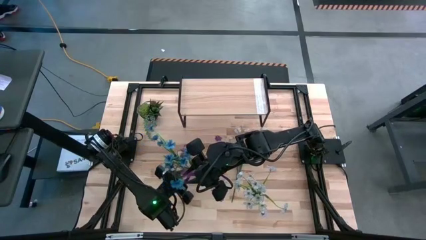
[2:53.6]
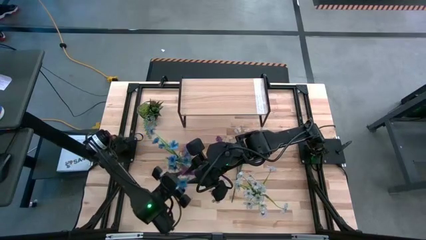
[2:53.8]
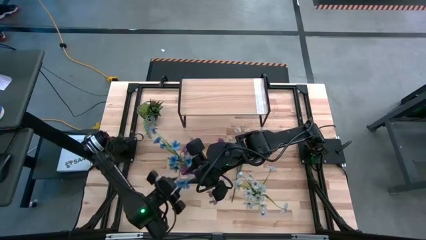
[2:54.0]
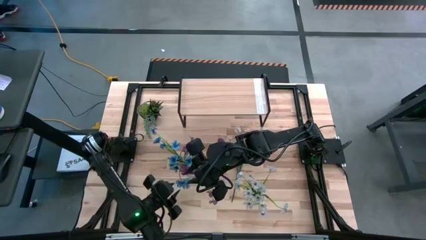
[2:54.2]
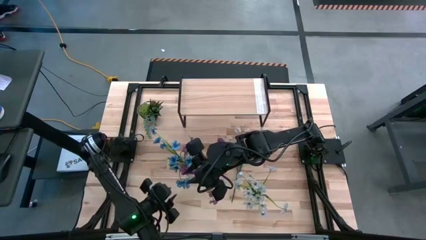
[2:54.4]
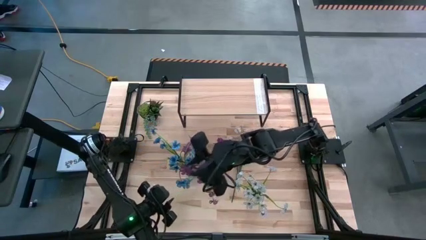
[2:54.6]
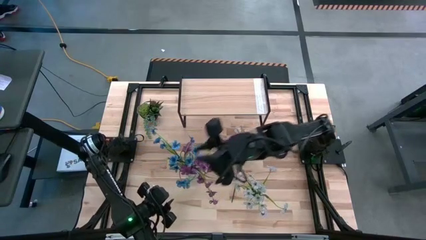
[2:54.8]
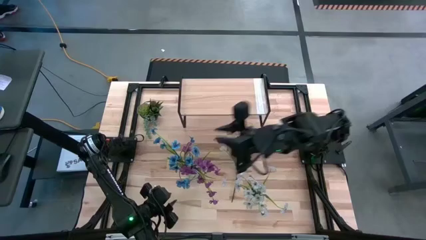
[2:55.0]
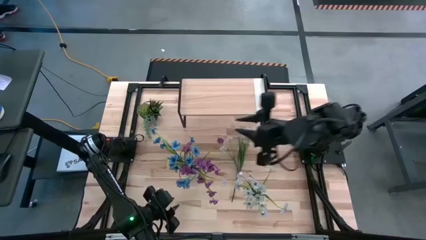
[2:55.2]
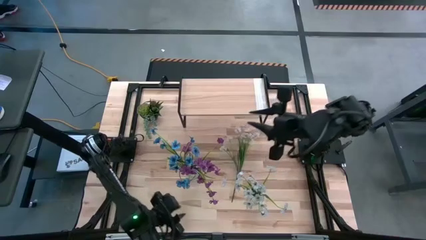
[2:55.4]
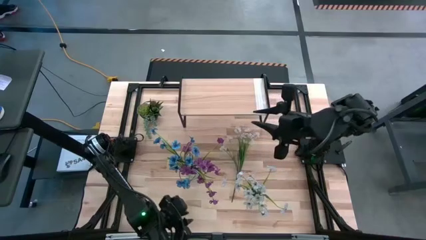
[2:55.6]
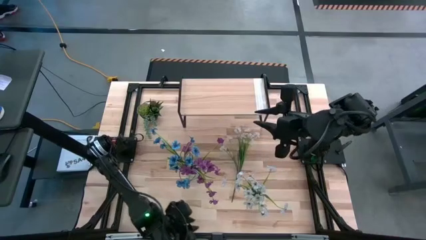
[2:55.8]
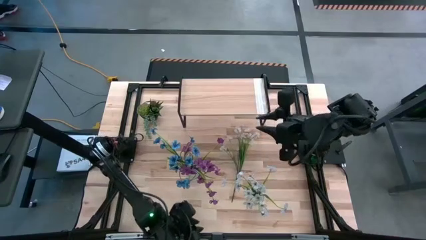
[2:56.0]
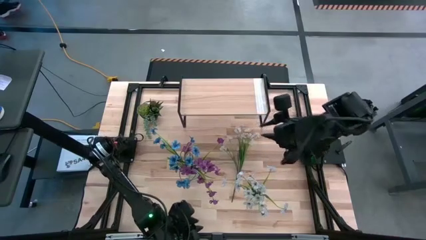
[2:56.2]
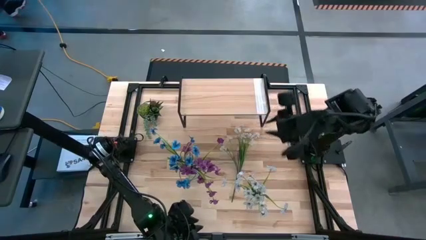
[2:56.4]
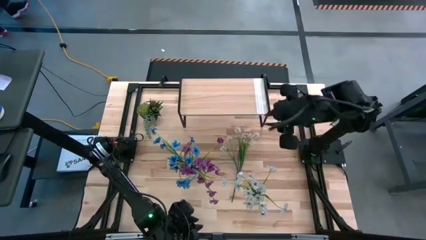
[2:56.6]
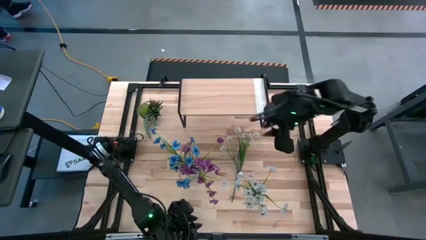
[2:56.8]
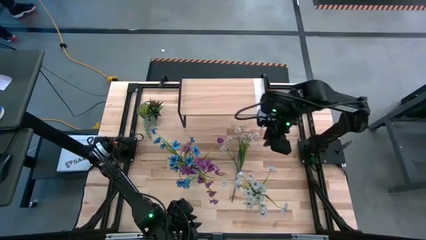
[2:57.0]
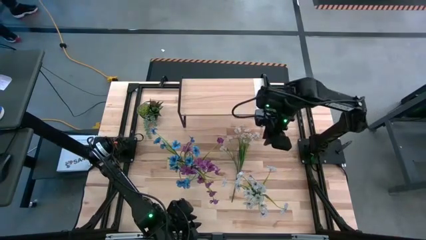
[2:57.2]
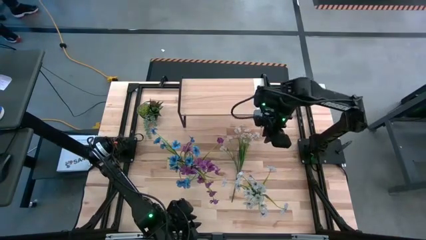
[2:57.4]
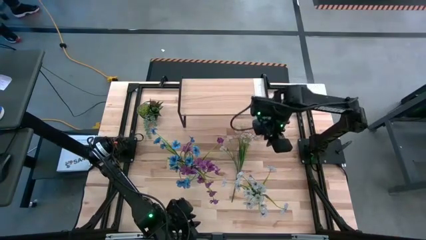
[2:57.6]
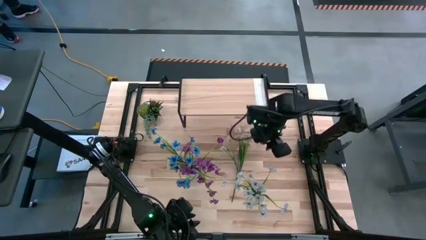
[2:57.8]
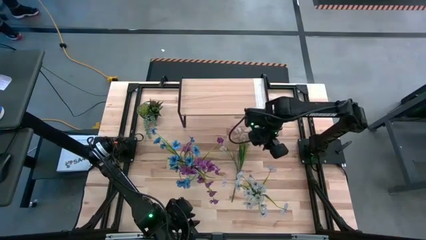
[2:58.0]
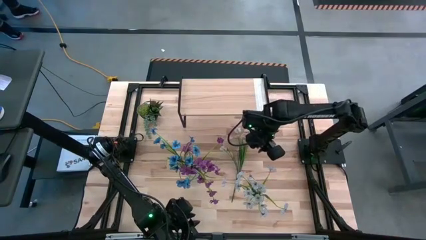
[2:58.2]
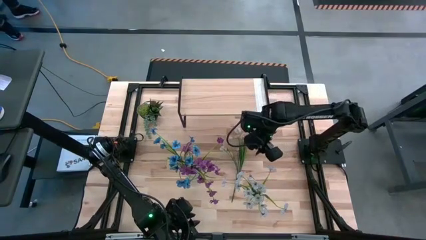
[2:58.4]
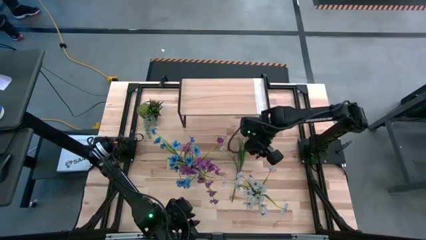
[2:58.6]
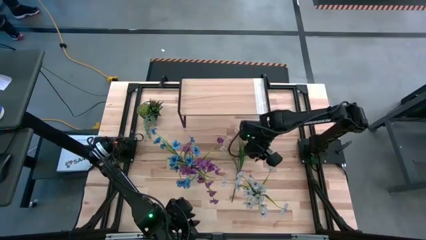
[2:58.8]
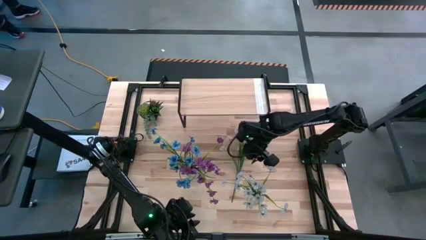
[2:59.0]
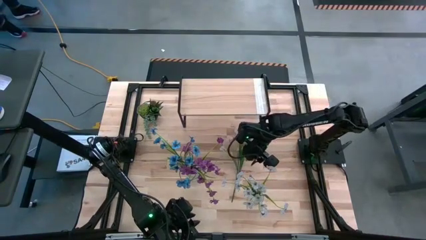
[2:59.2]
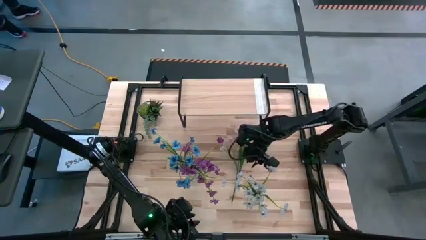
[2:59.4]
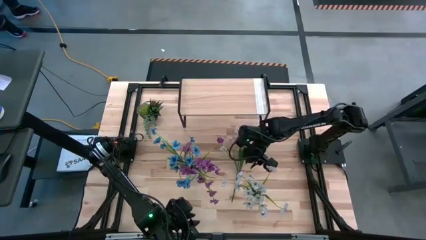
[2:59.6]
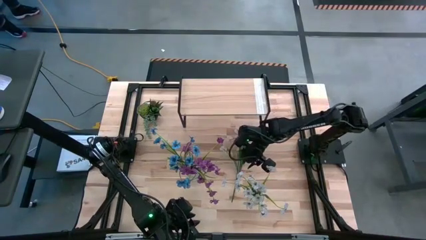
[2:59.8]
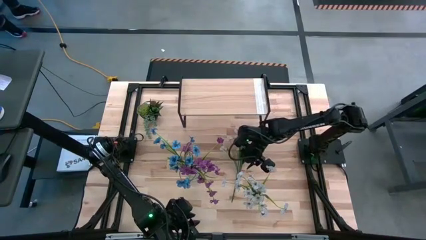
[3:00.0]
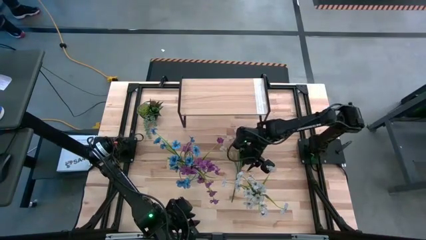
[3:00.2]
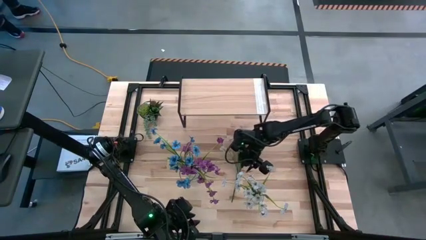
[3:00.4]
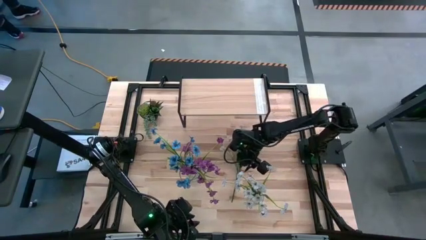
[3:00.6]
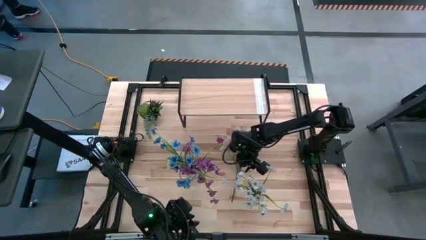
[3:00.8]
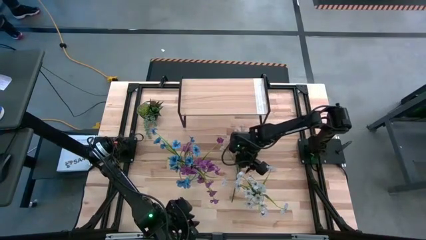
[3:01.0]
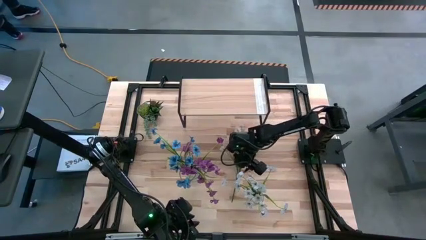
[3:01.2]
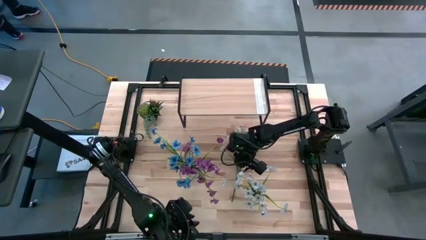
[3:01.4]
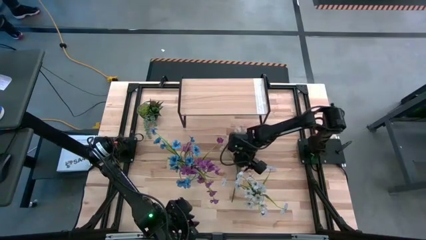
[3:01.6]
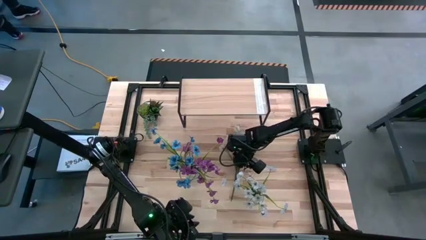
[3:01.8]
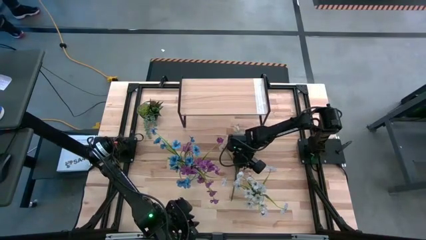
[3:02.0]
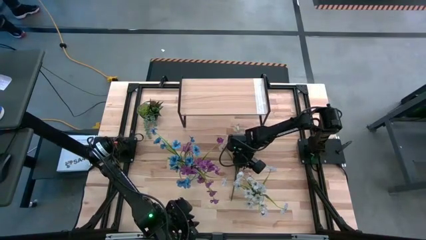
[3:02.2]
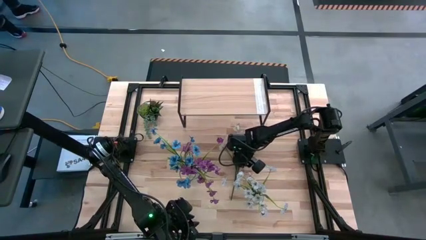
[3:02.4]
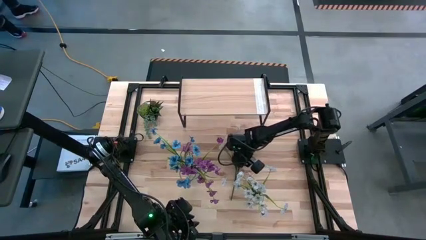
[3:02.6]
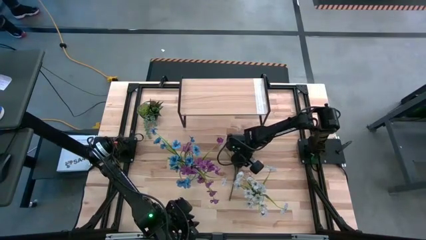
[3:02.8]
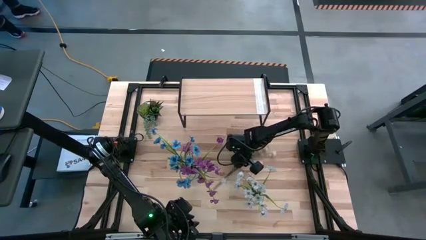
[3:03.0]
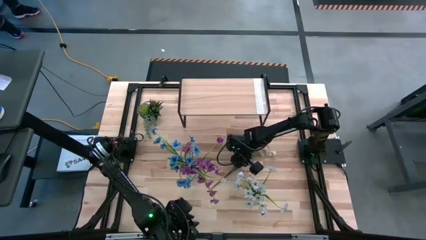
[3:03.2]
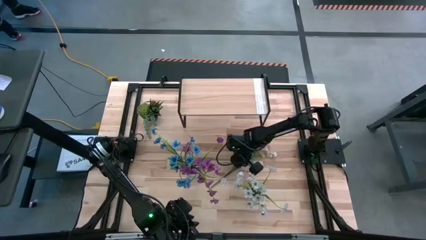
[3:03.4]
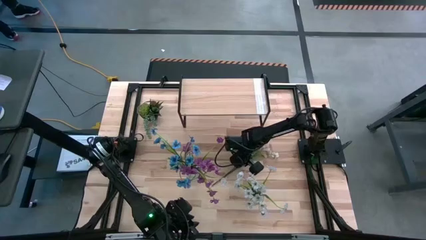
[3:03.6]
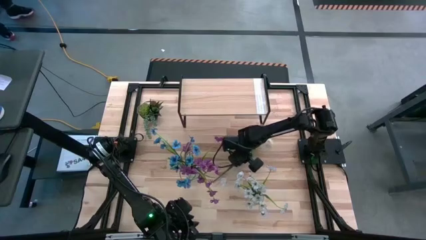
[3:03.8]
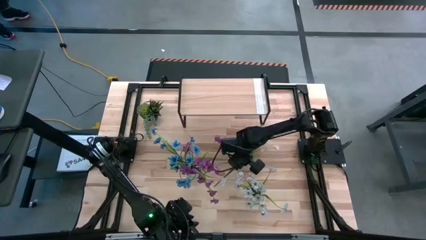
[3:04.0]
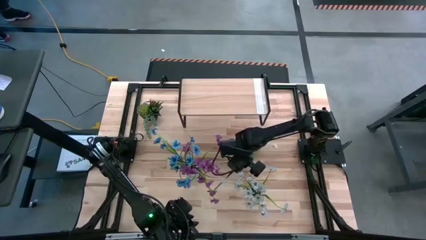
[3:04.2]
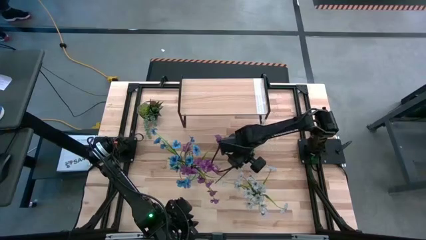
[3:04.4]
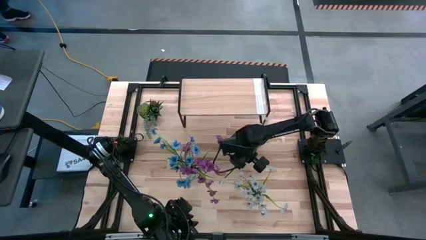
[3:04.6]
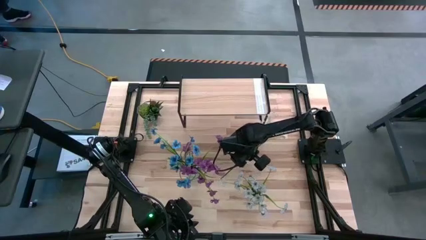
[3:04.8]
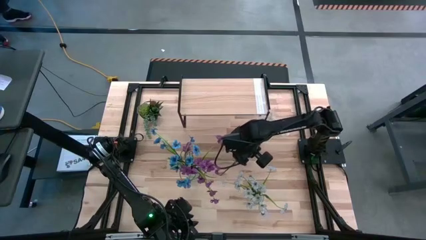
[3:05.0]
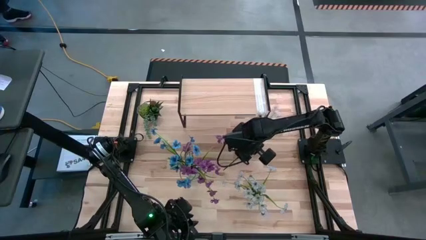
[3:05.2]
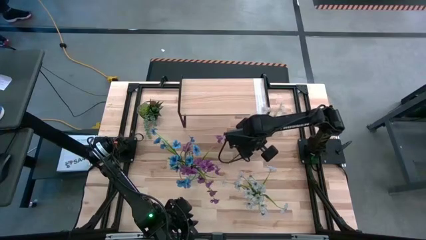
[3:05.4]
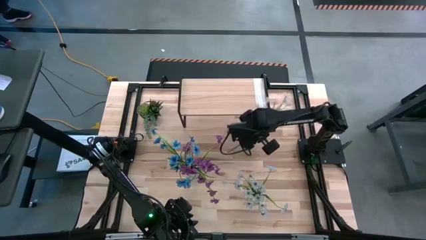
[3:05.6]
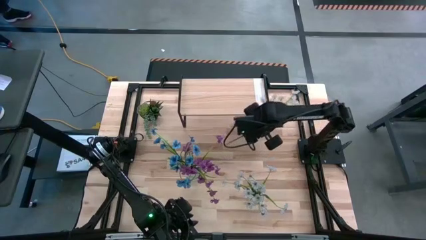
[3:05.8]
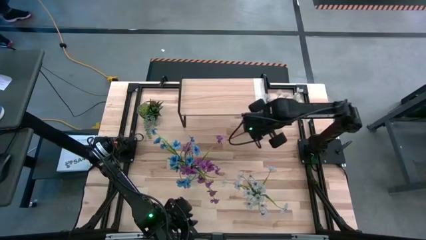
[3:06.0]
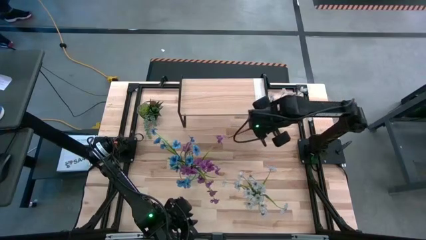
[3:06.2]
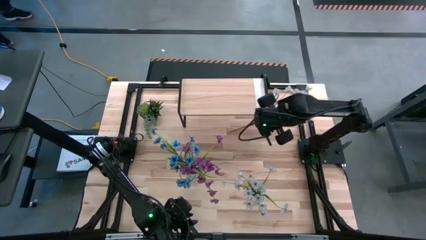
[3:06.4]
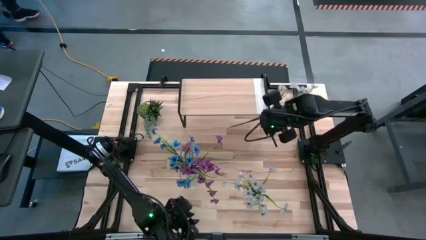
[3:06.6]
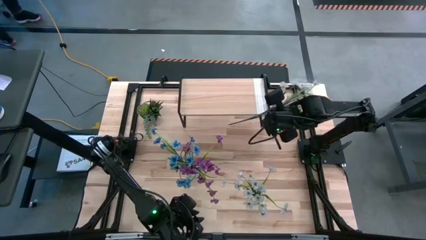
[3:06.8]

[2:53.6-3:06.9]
Task: Pick and place flowers into a vace then onto a shelf
Put the white flowers into the right transparent vase

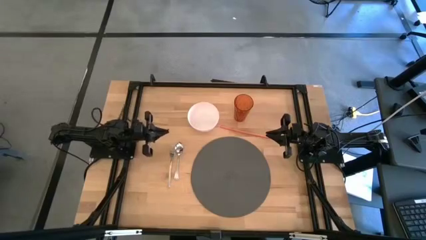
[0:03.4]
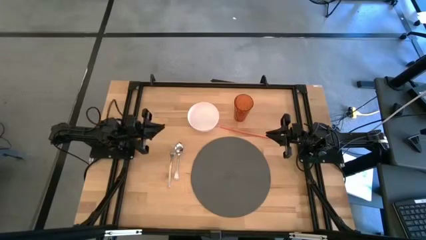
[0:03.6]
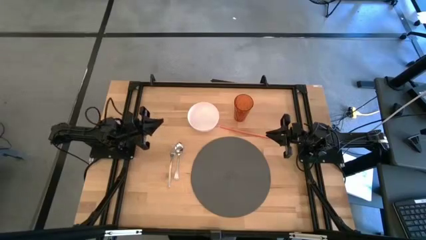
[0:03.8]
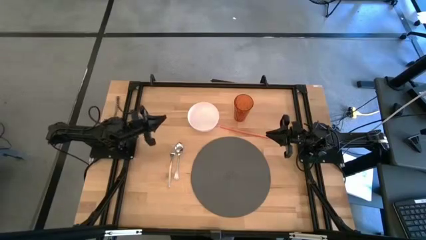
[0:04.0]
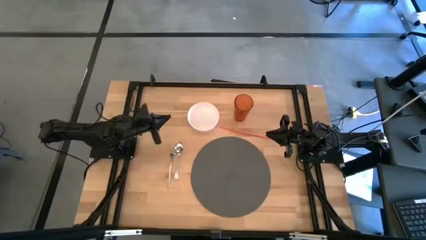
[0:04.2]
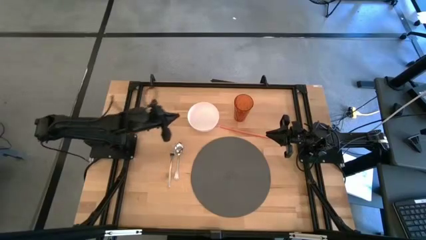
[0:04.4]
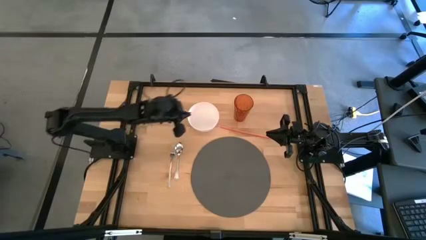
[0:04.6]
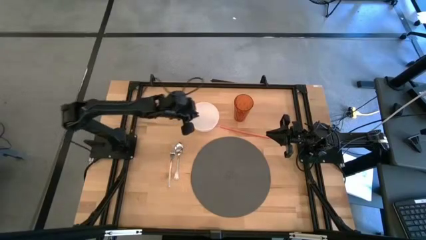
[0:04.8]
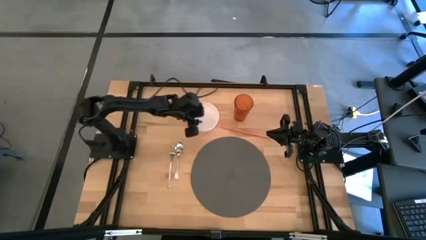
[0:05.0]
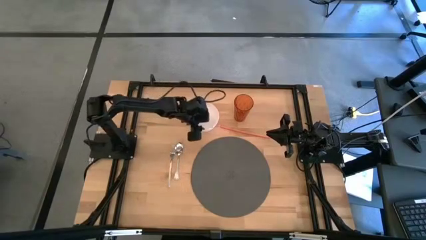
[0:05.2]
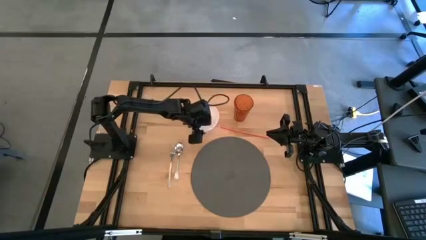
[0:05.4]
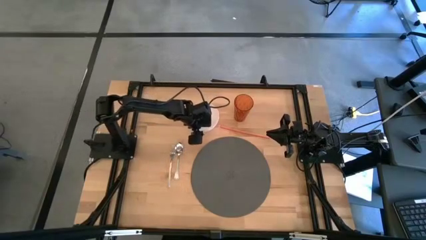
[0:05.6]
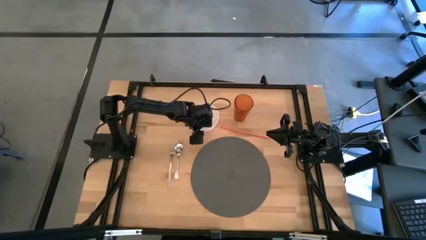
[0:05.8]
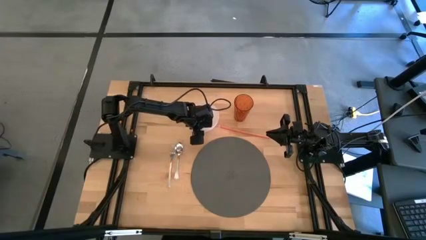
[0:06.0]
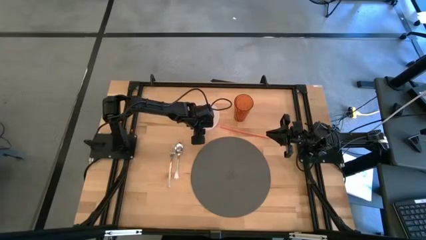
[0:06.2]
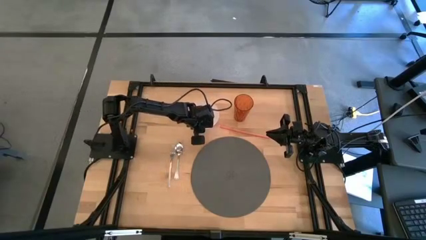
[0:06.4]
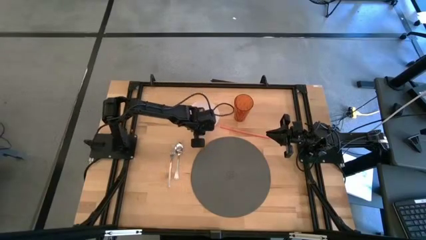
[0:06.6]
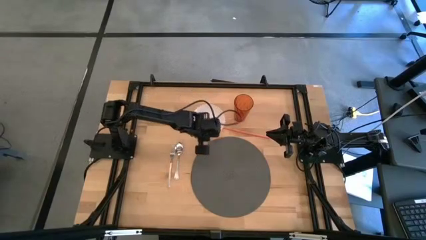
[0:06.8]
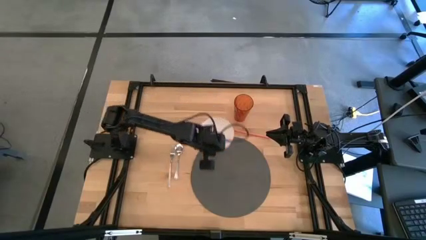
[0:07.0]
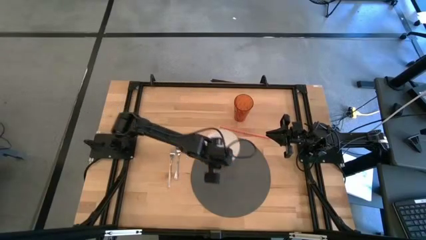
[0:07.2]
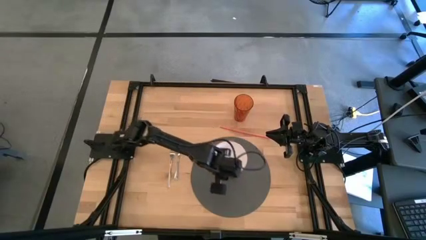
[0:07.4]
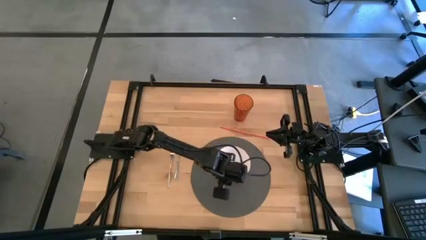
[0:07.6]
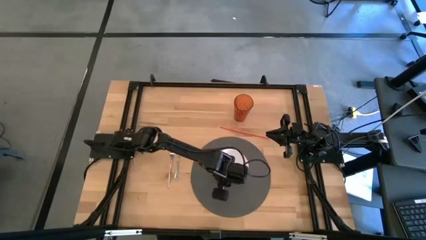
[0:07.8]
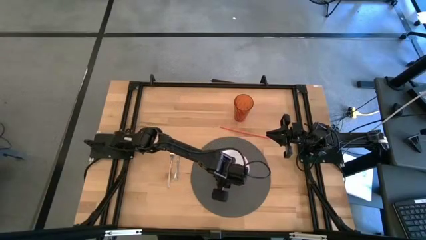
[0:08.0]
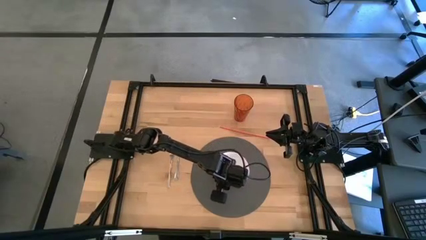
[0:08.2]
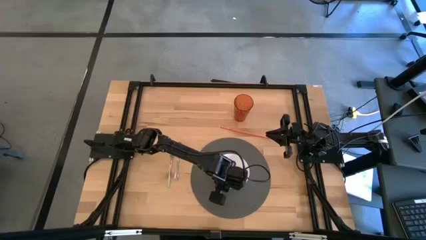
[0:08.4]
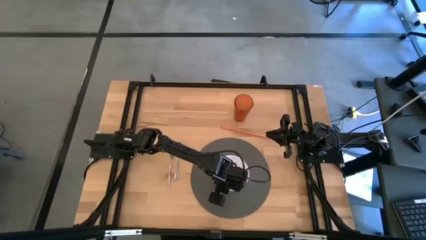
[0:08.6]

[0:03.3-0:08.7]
Task: Pick & Place Utensil
Put the white bowl on the center of the gray mat
